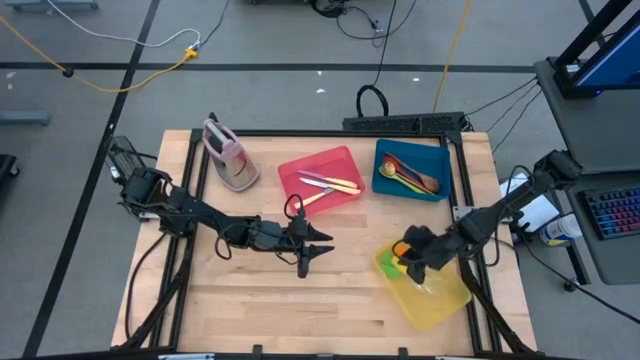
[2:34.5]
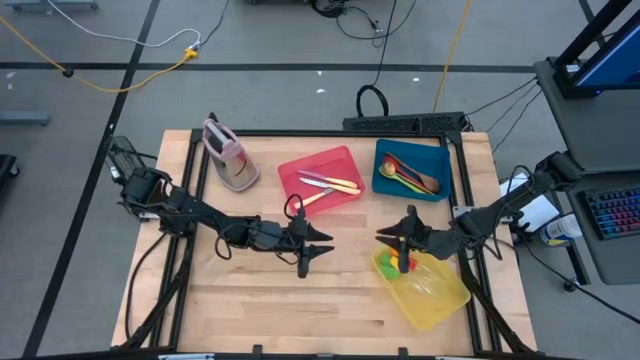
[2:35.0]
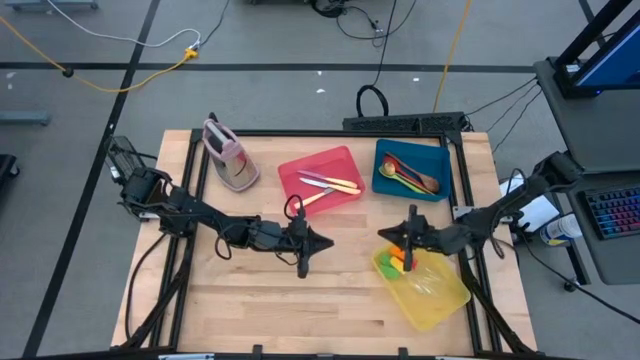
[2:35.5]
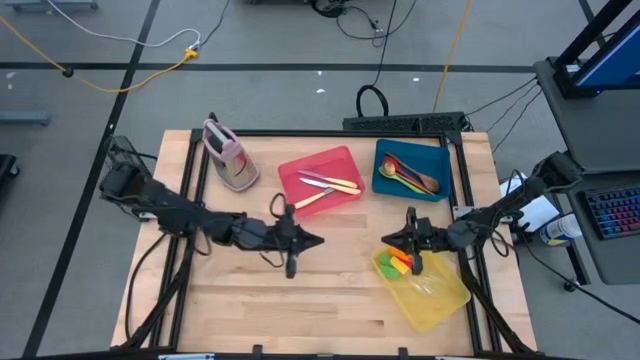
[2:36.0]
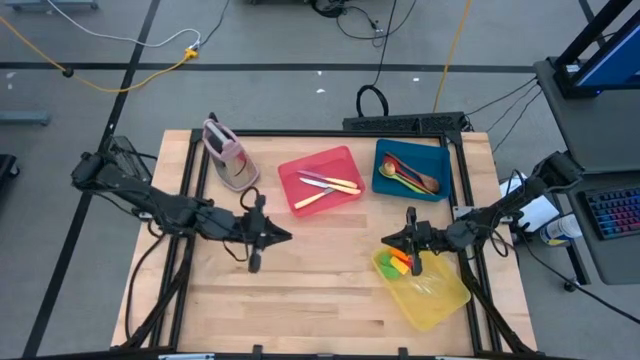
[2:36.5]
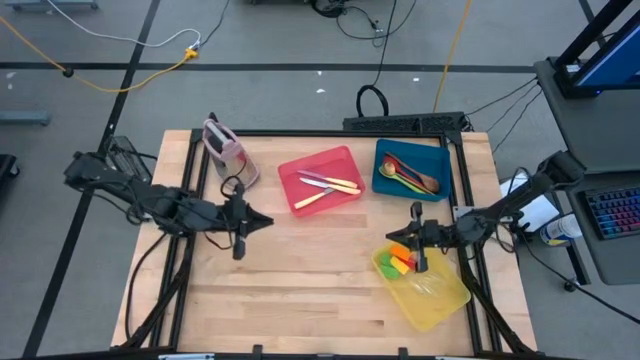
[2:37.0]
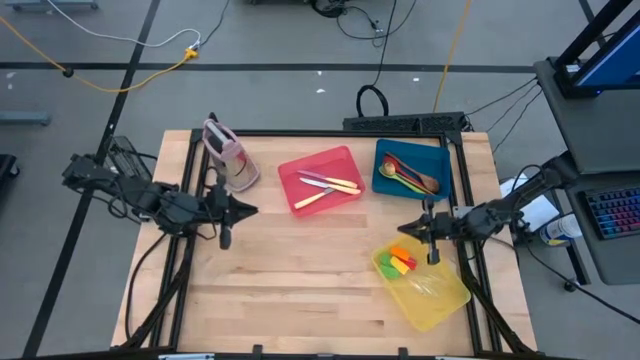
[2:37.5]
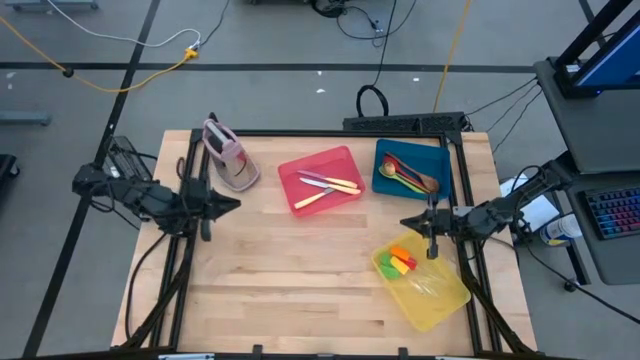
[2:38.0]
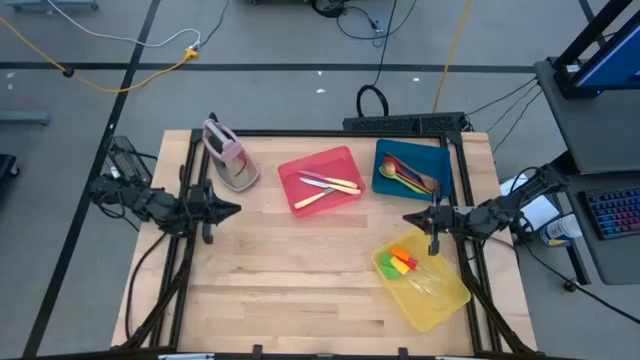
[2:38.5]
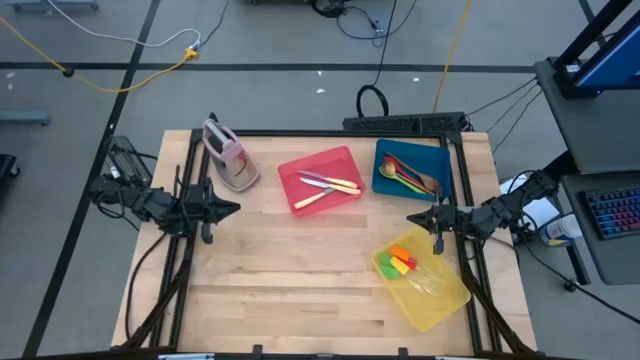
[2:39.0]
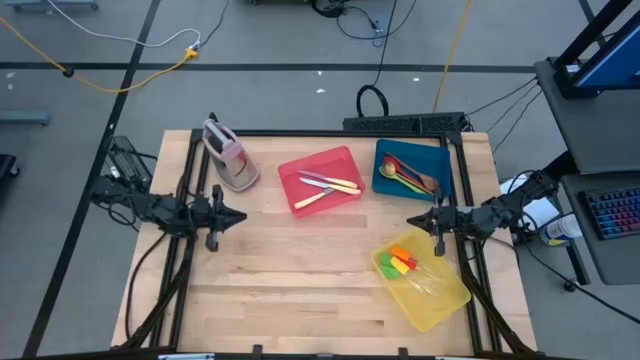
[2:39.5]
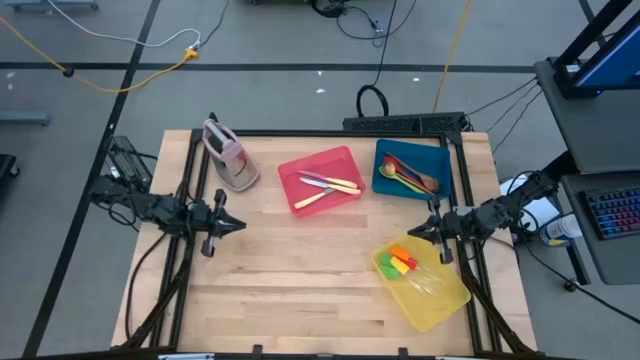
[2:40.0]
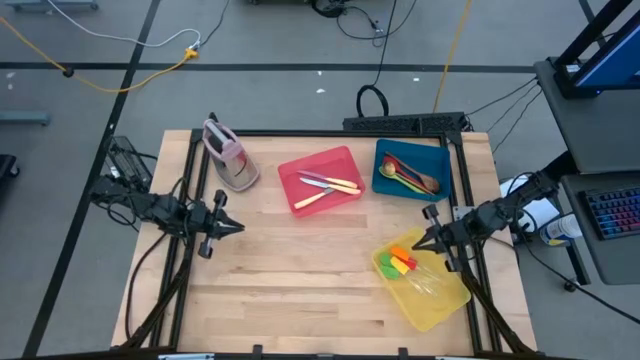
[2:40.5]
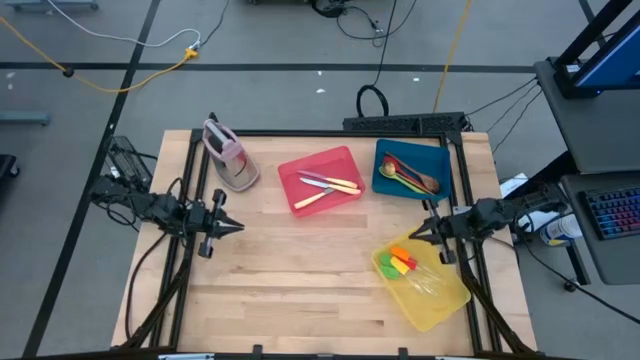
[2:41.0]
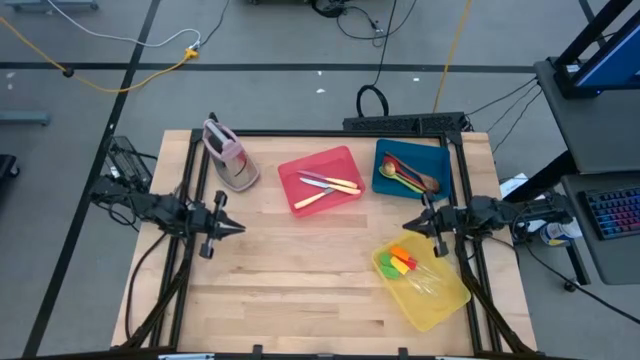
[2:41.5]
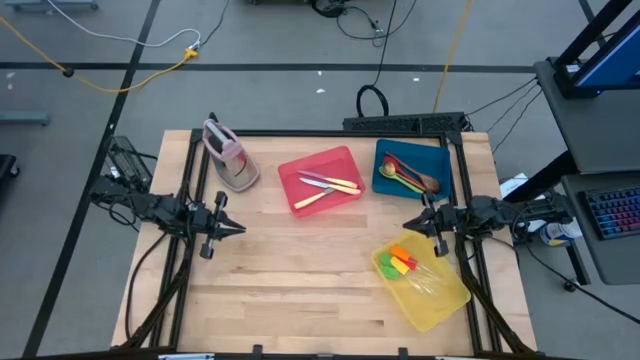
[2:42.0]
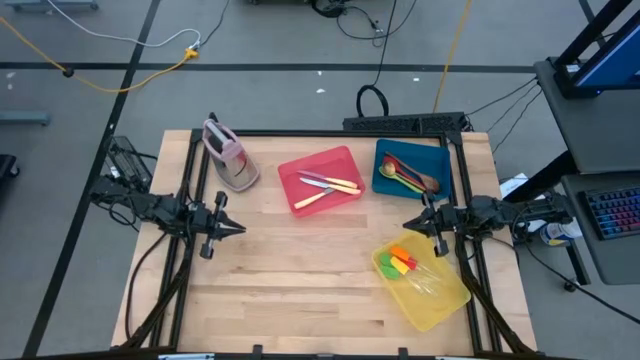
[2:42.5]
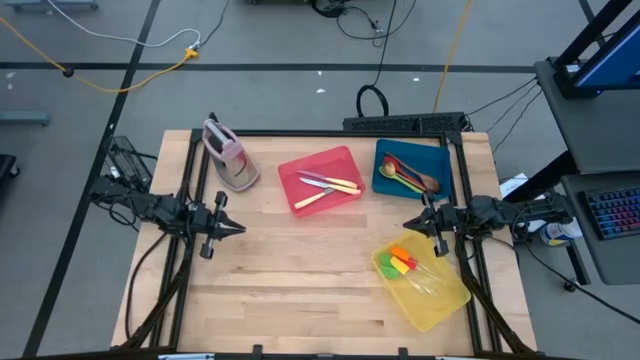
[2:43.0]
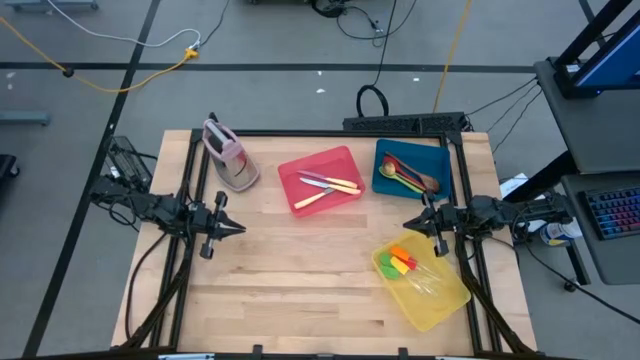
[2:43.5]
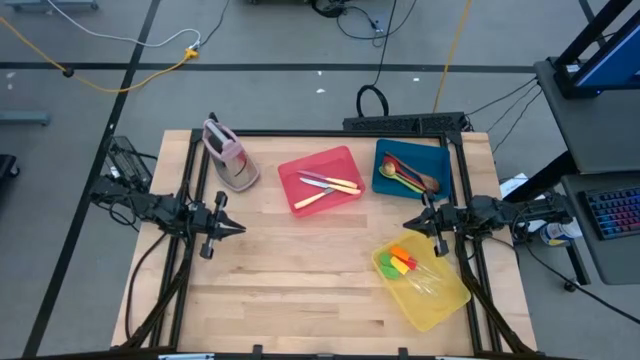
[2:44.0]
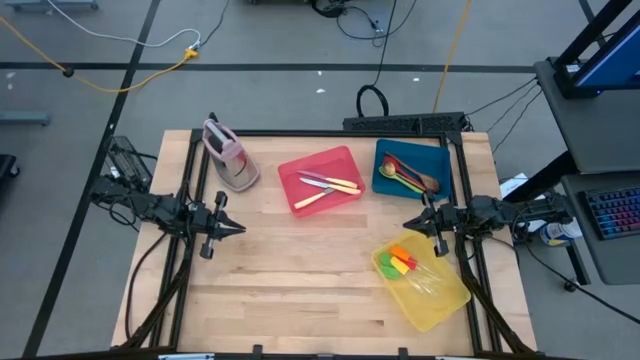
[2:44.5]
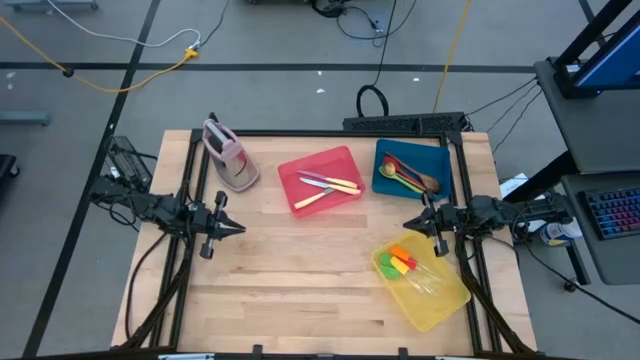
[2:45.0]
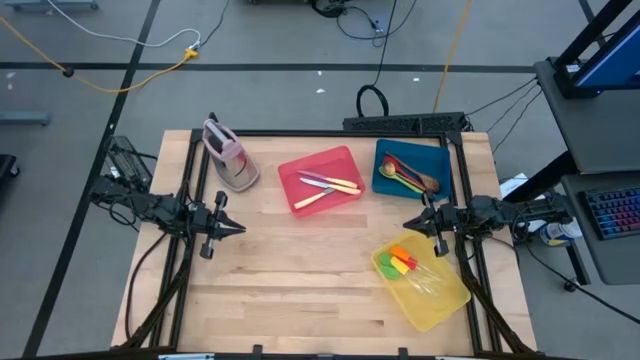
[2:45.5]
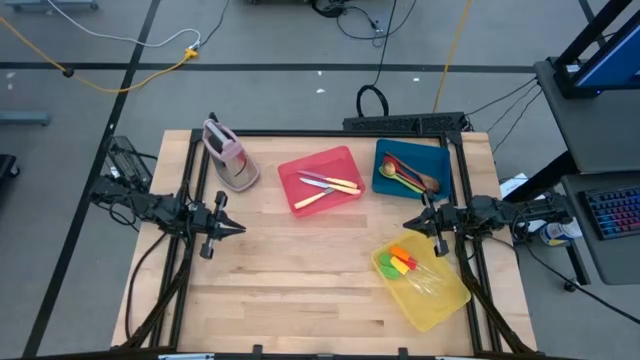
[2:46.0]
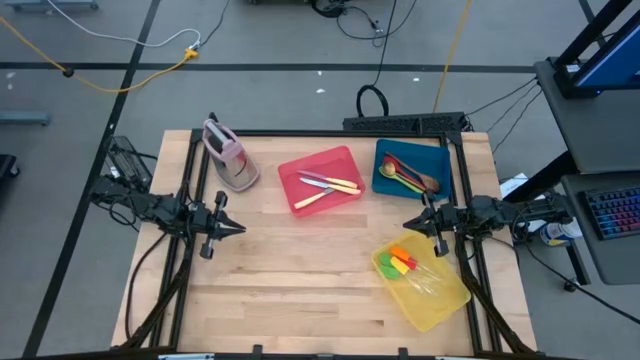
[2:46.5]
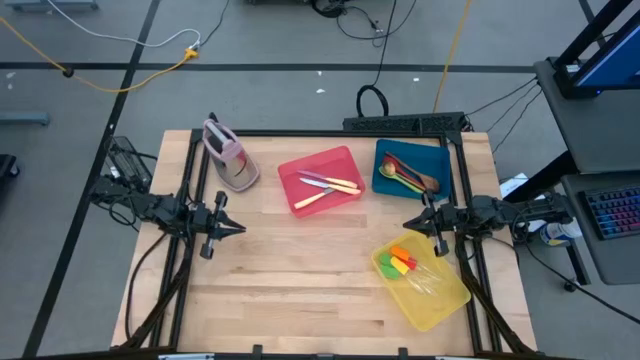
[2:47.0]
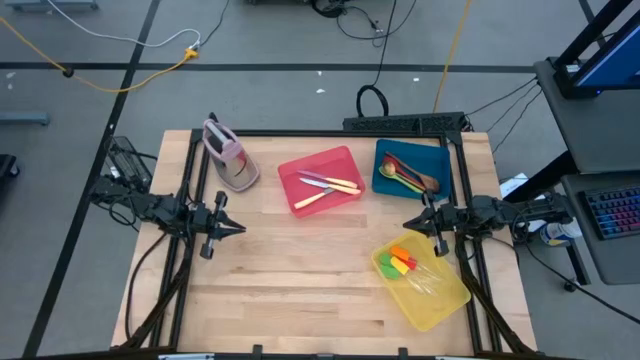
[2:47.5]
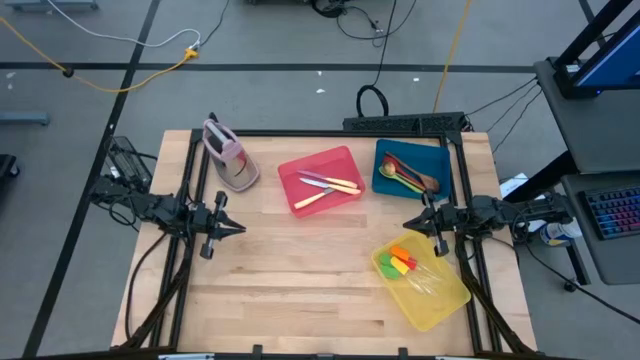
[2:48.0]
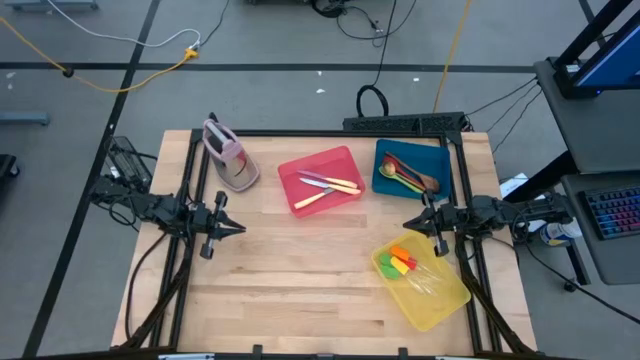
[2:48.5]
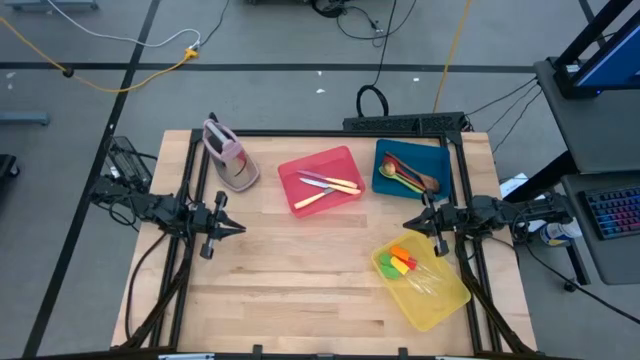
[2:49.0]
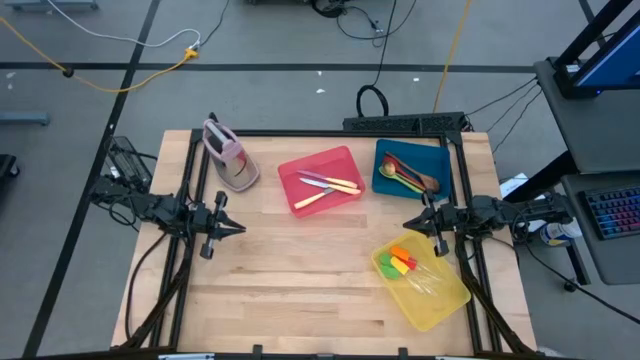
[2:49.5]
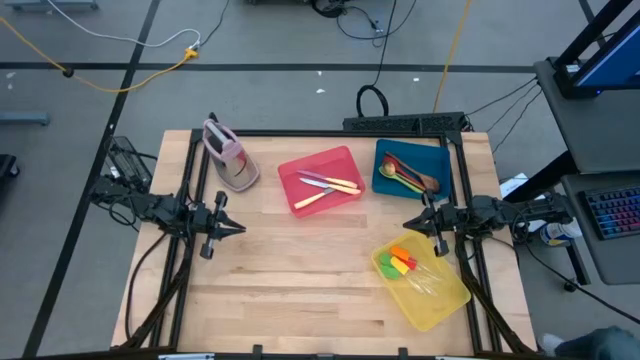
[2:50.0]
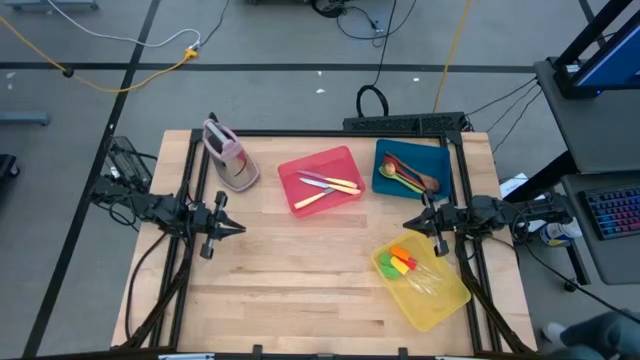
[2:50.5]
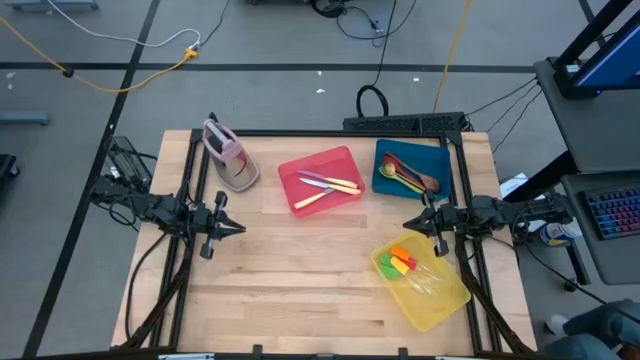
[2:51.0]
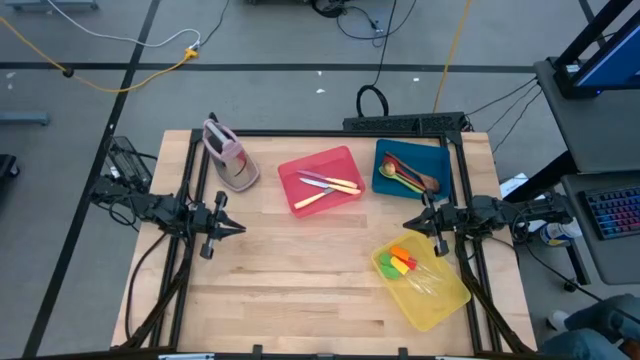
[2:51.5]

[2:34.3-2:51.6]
Task: Pick & Place Kitchen Items
Return to Home Position

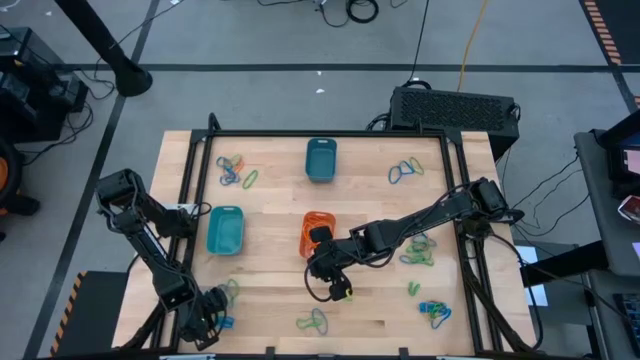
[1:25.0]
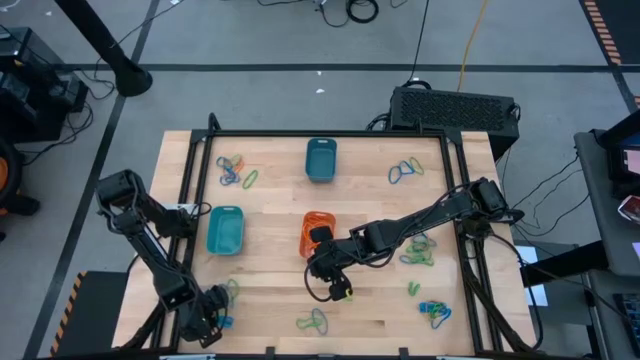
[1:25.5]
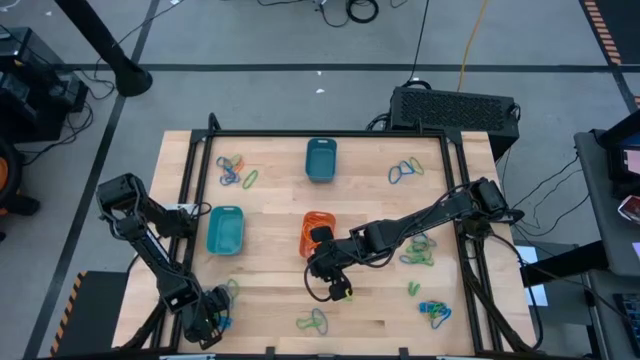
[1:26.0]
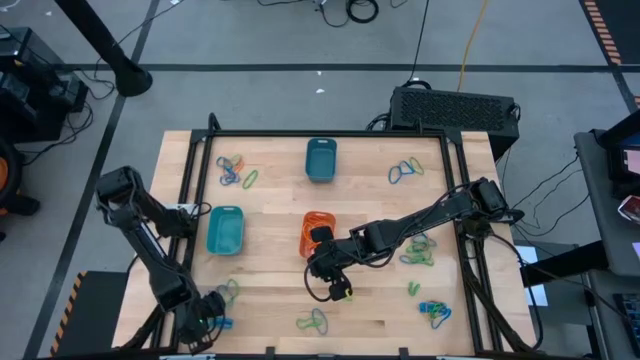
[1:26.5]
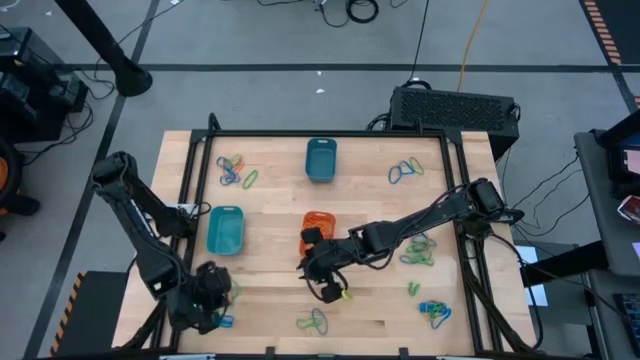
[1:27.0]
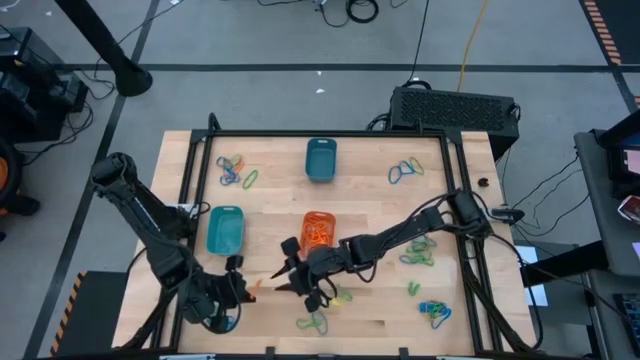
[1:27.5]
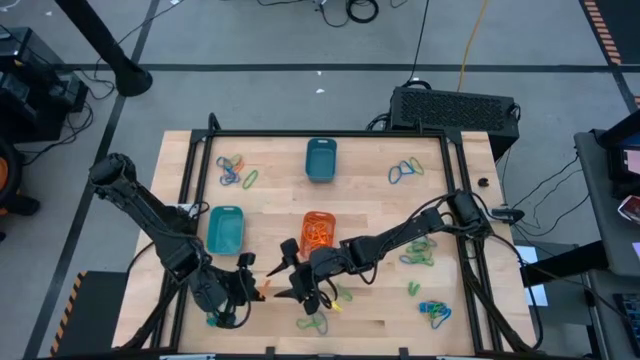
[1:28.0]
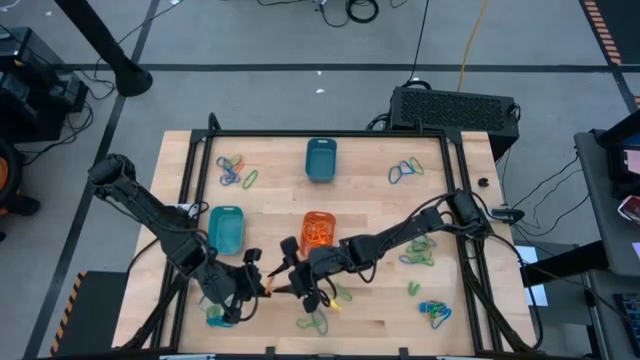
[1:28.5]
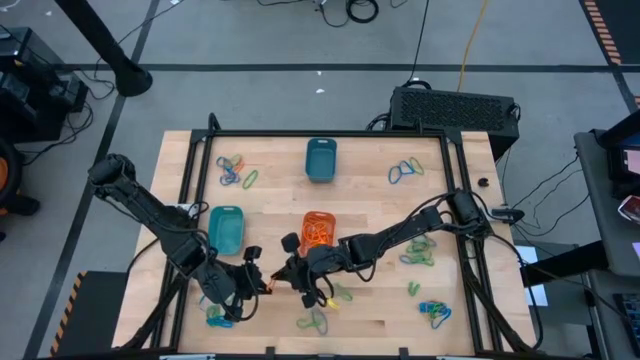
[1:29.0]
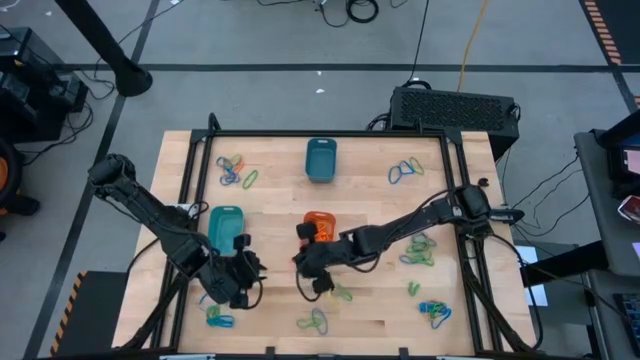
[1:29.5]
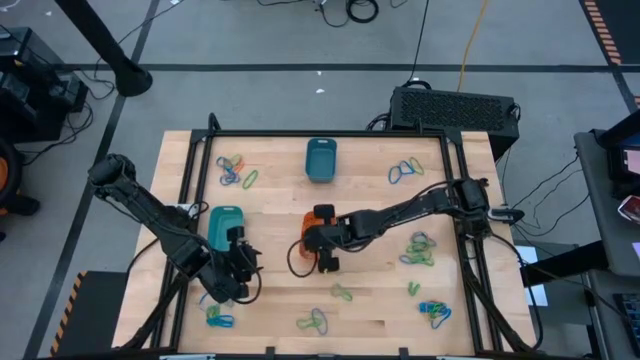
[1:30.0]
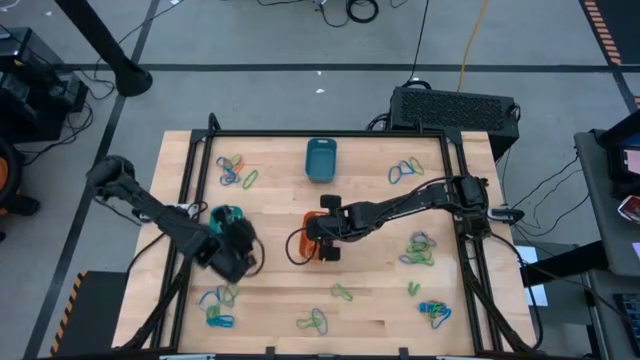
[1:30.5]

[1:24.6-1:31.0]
Task: Sort rubber bands into baskets
Put the orange rubber band into the orange bin
